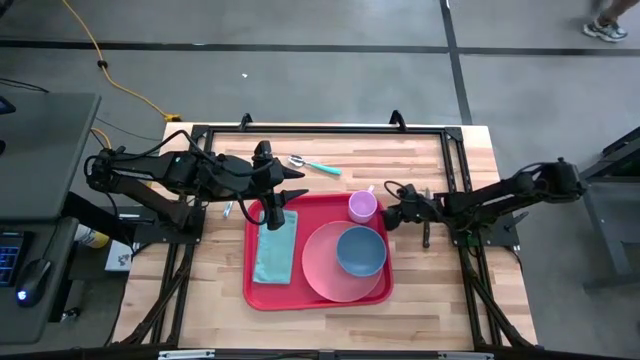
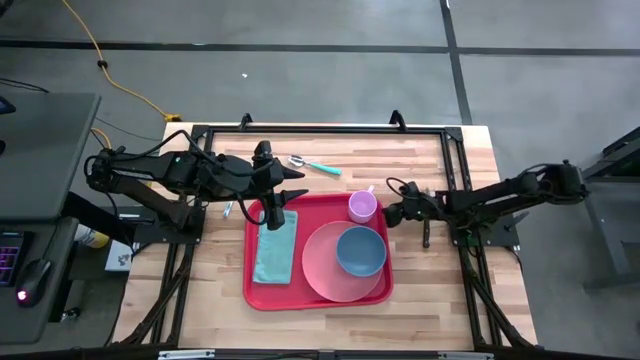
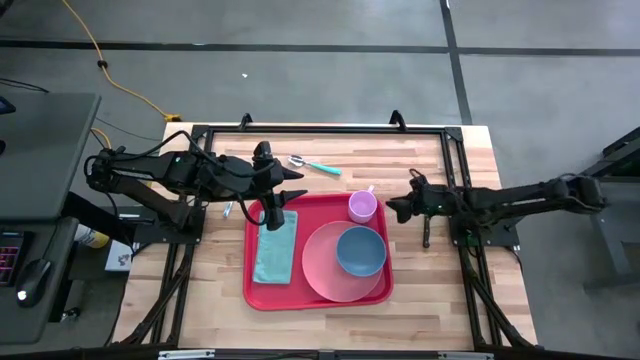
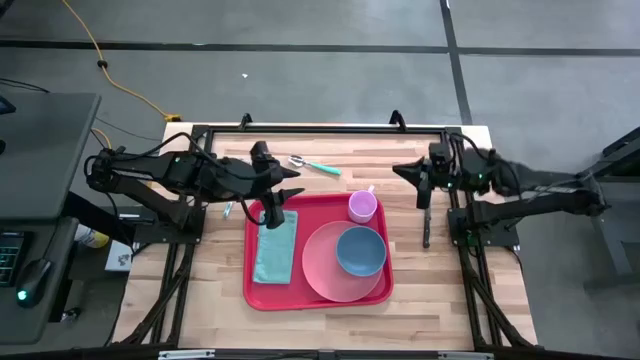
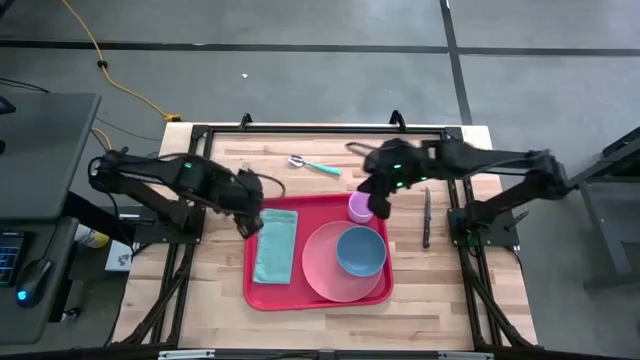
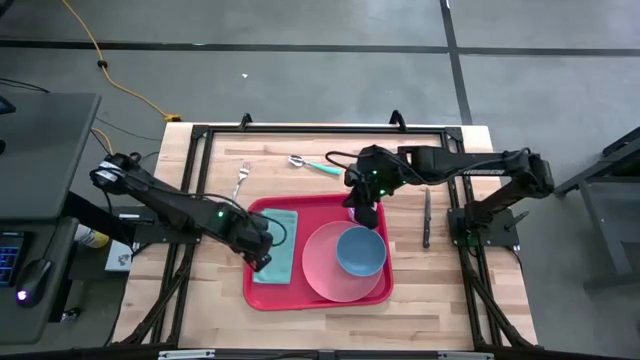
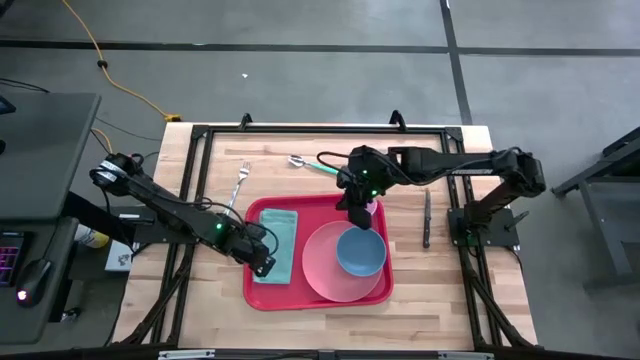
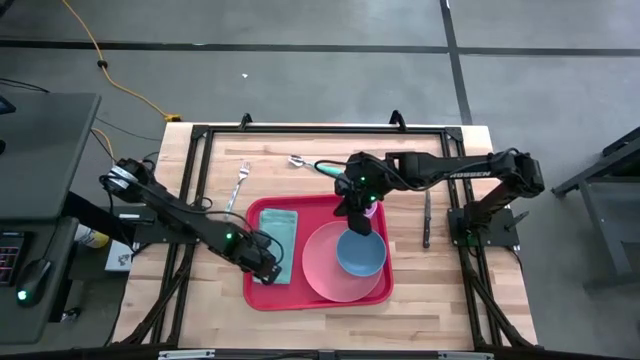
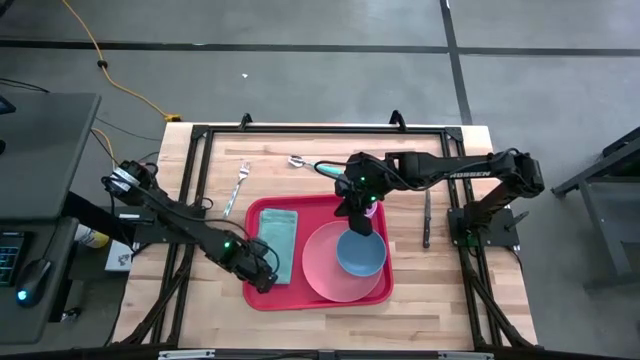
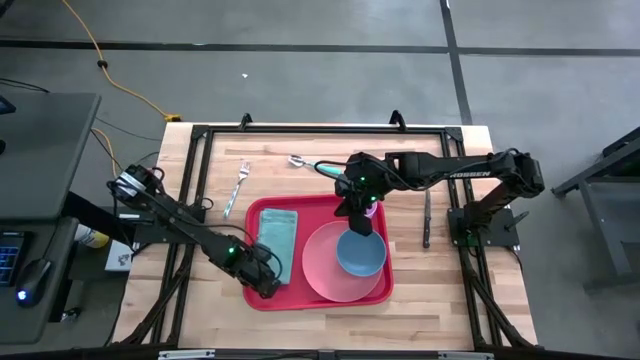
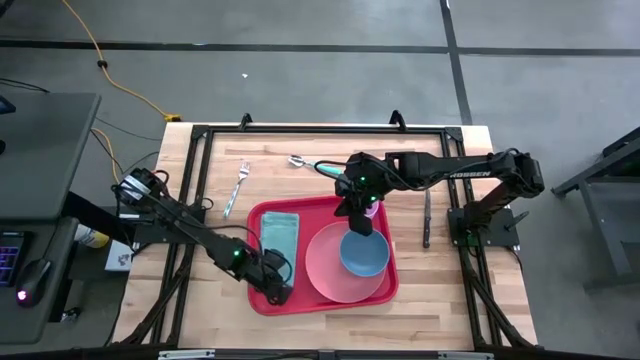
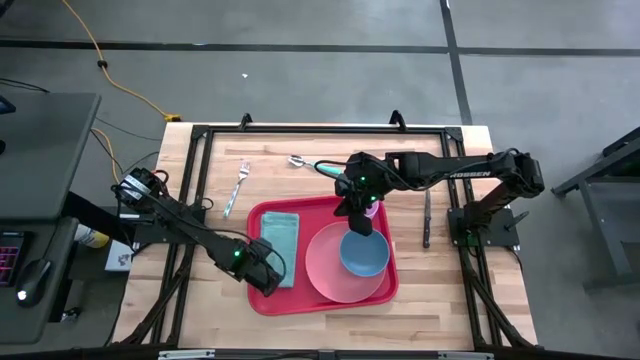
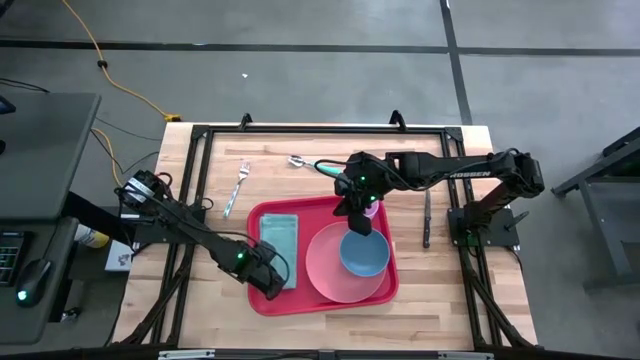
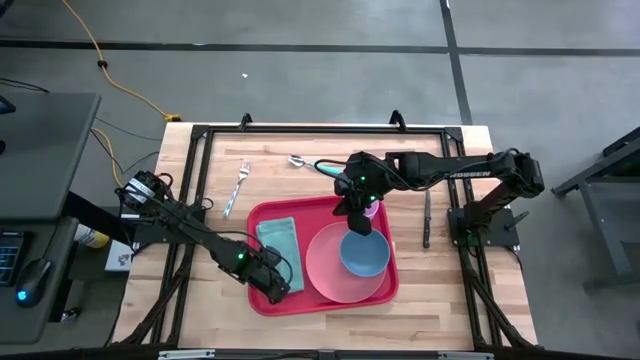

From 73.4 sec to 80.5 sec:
Task: Set up tray
Adjust the blue napkin on the red serving tray

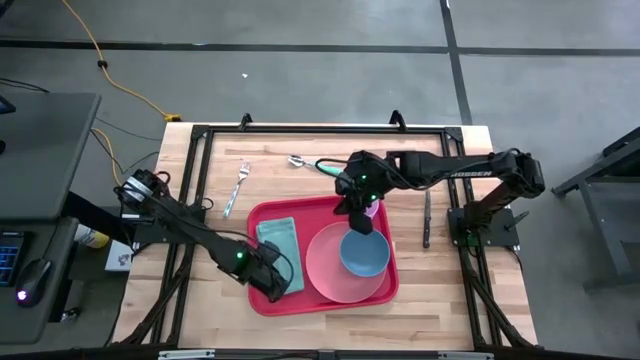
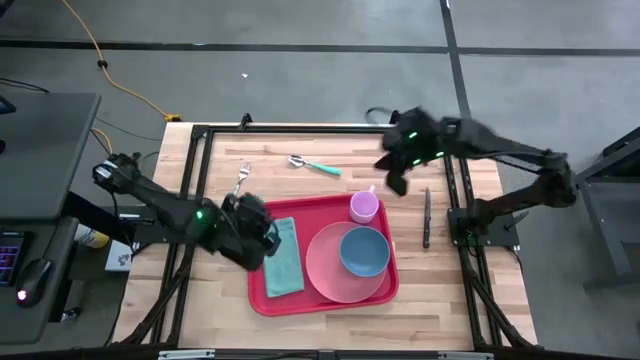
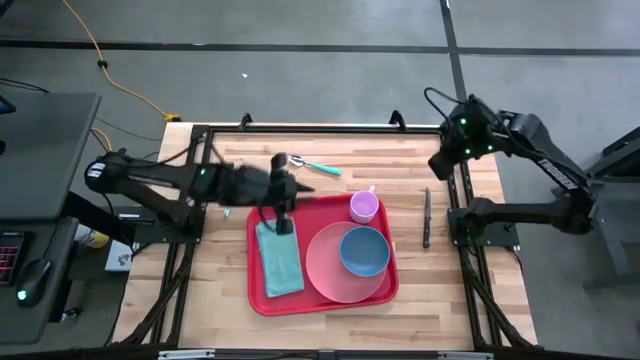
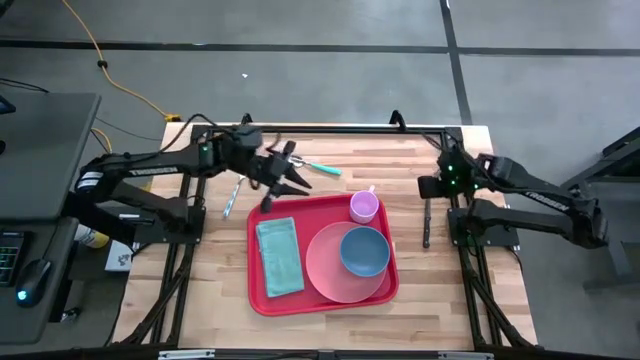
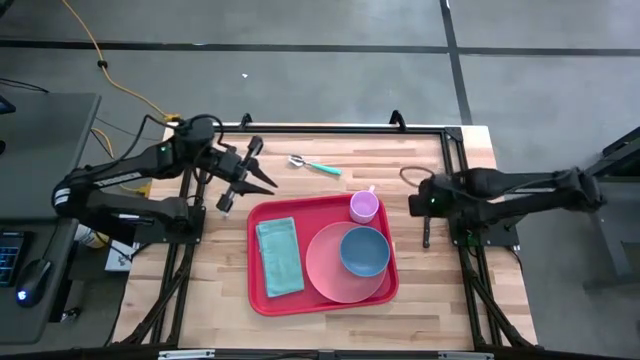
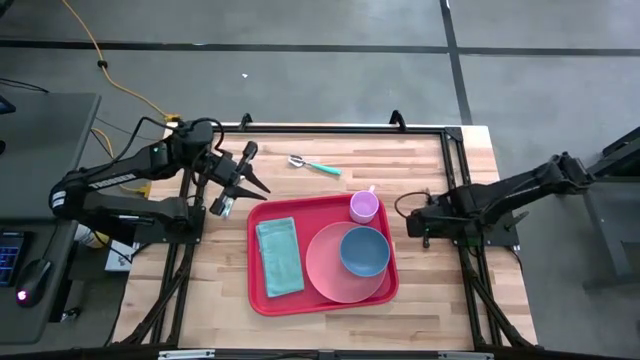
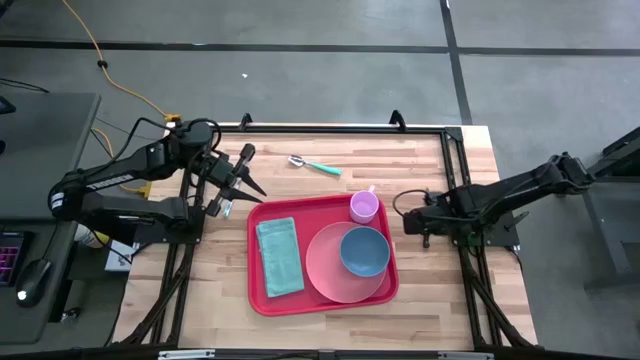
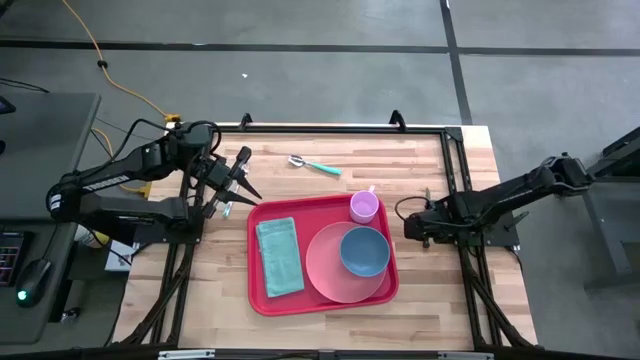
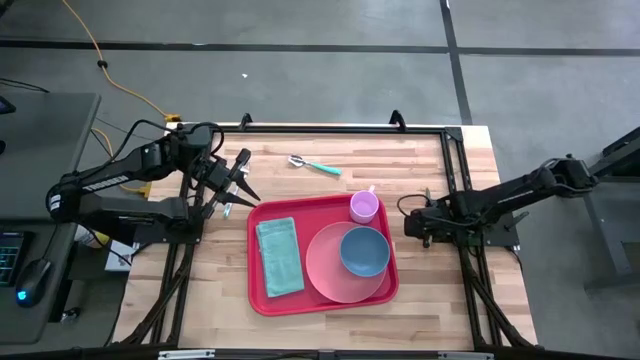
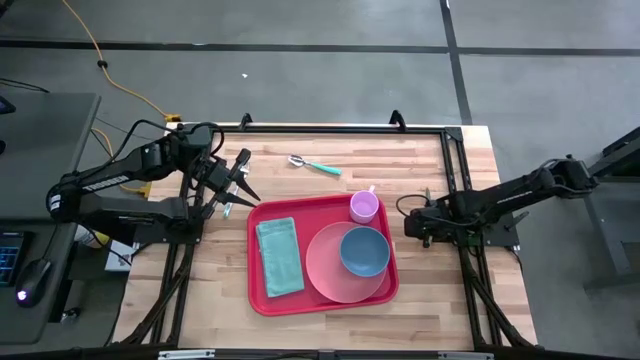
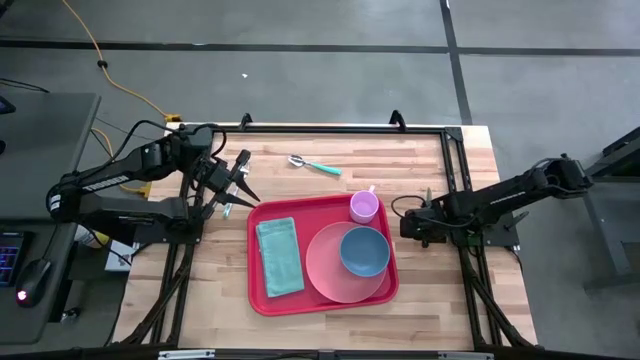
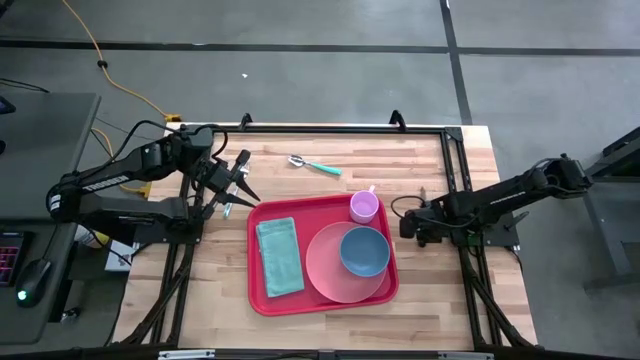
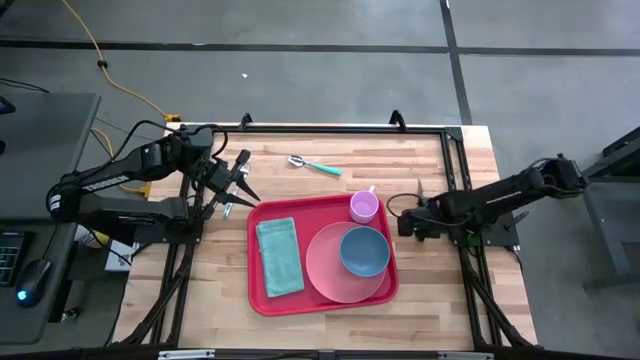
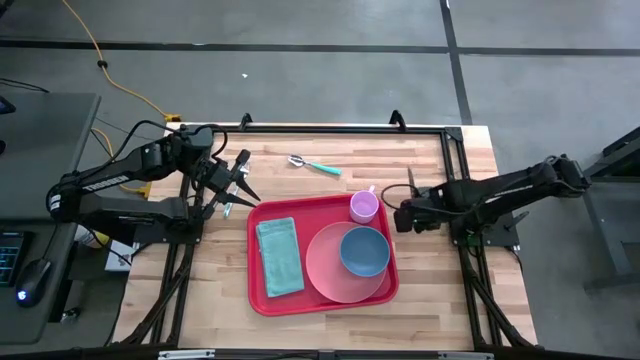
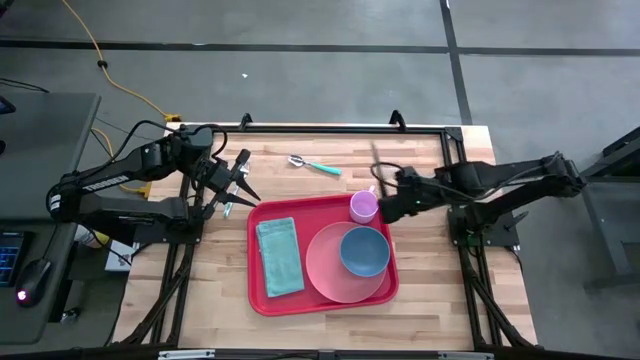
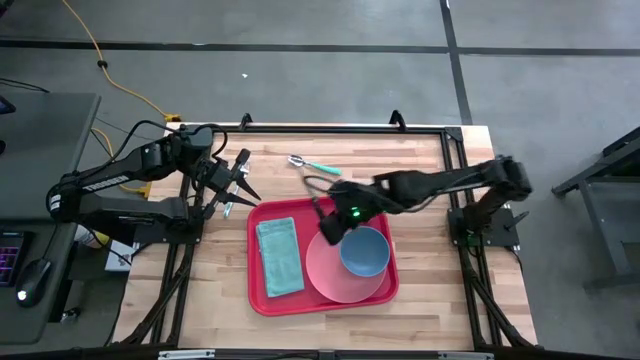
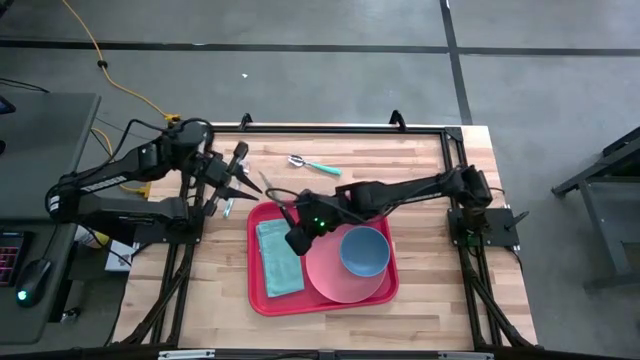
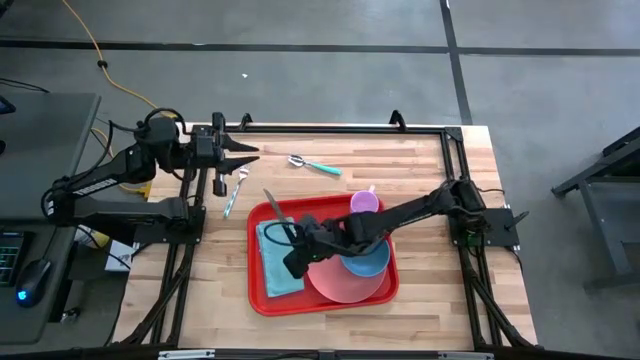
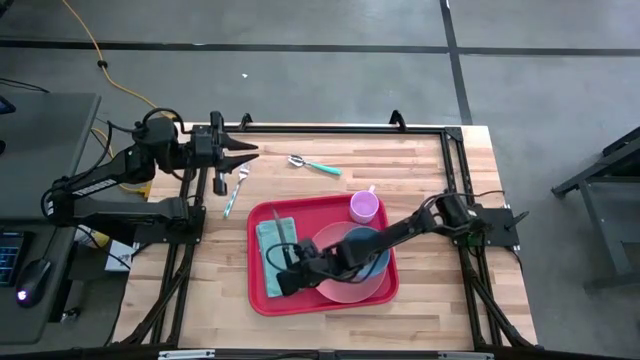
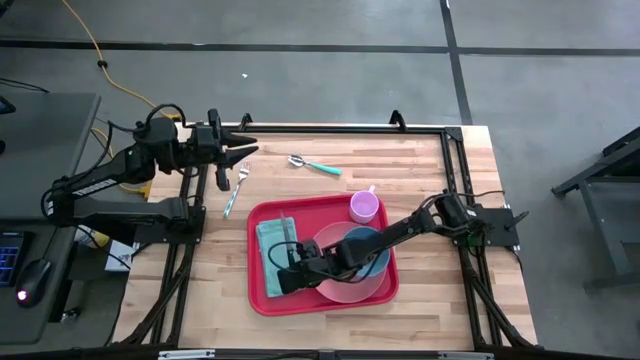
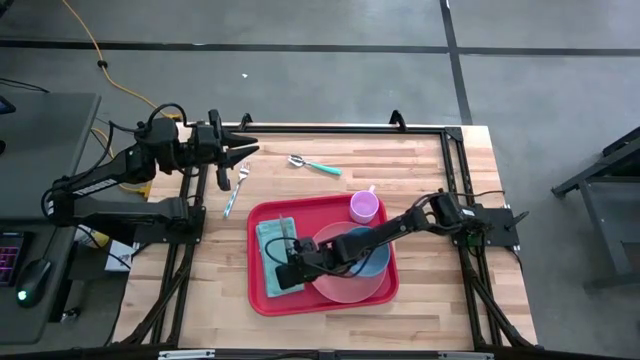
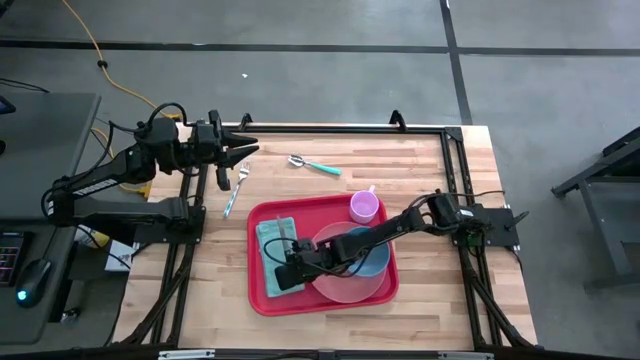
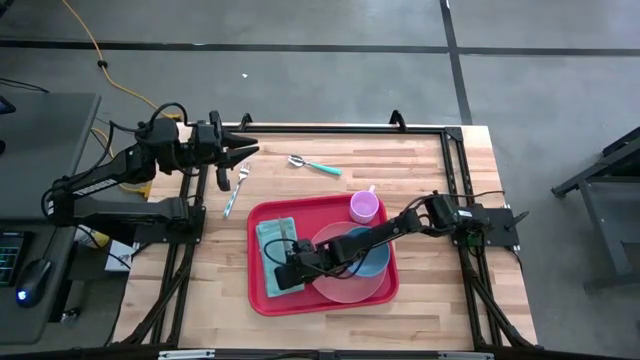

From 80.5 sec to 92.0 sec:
Put the black knife on the blue napkin

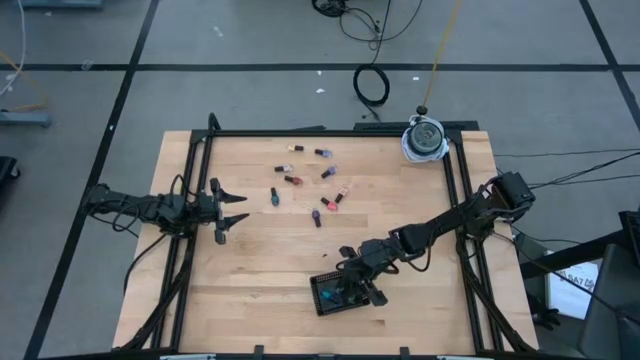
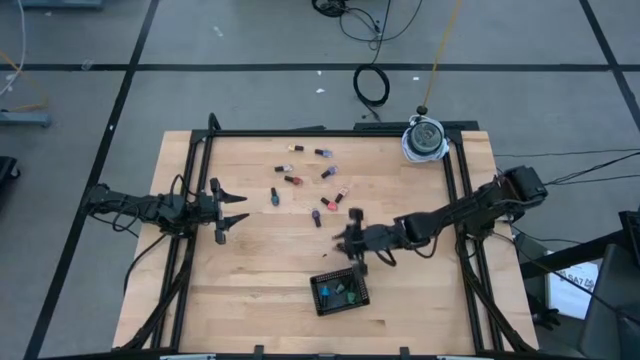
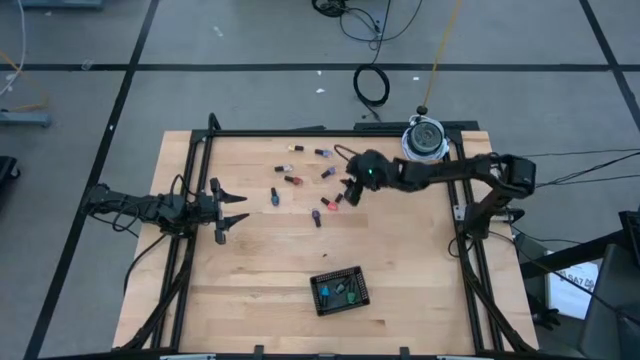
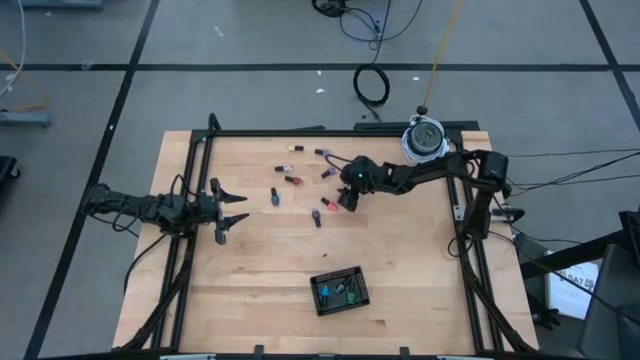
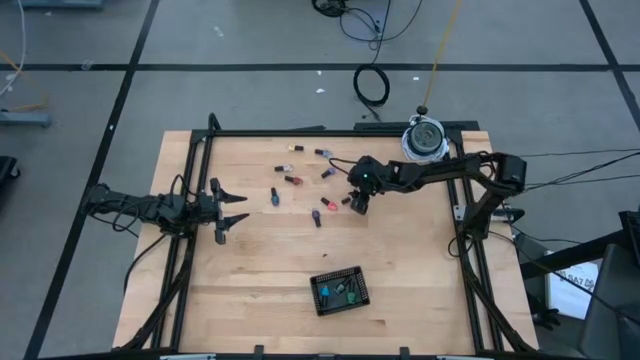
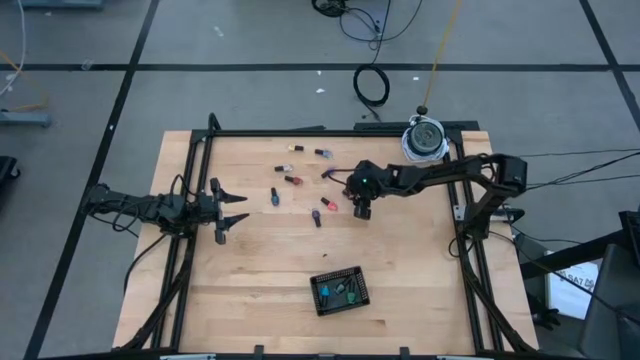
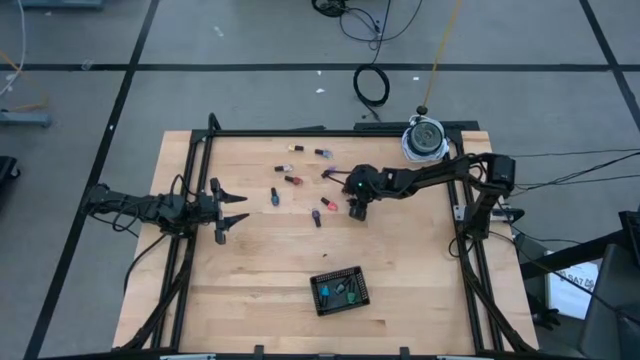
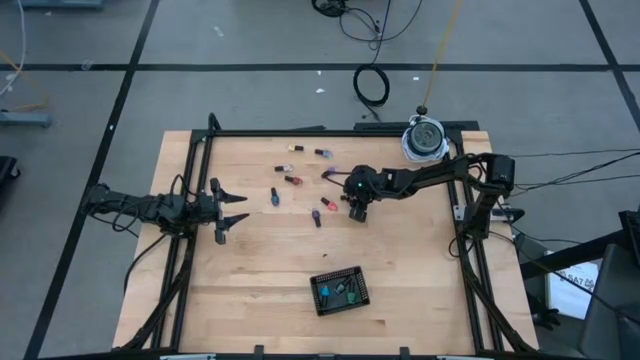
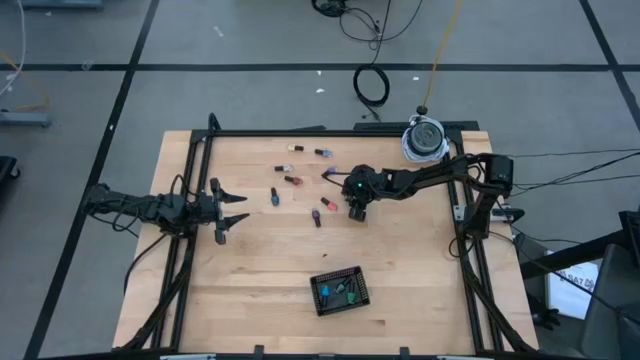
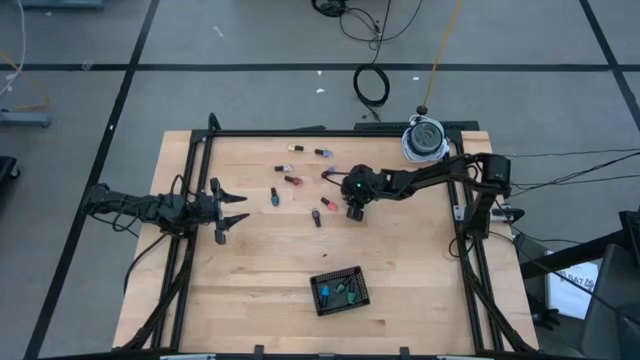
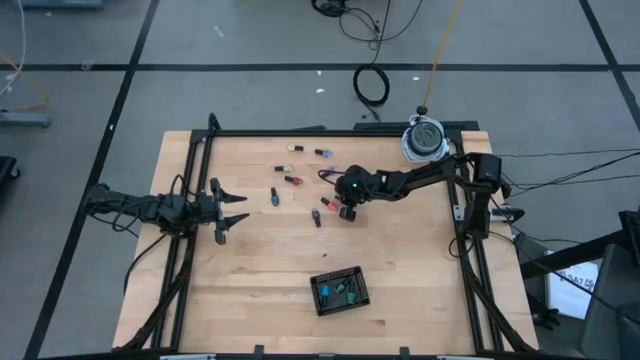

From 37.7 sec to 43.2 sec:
Task: Pick & Place Nail Polish
Put the light brown nail polish bottle into the black bin
